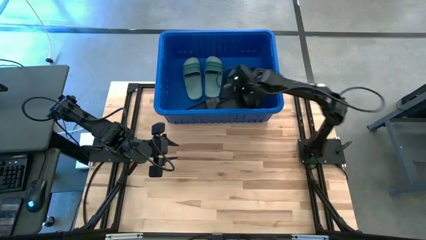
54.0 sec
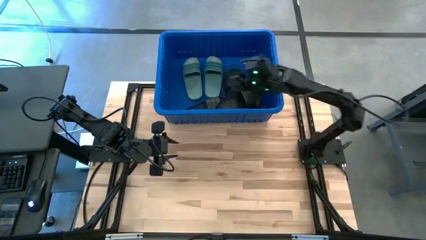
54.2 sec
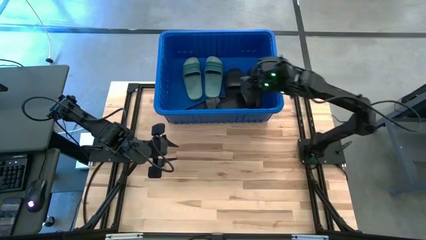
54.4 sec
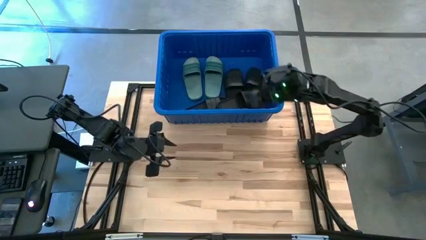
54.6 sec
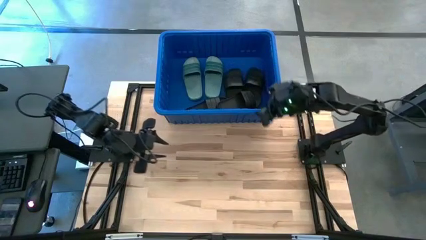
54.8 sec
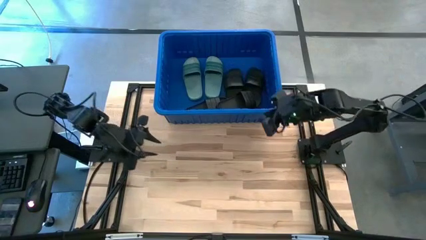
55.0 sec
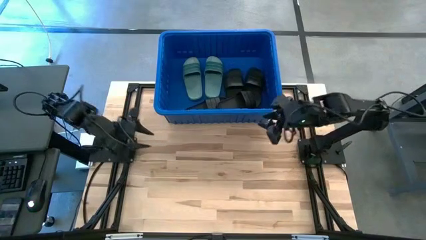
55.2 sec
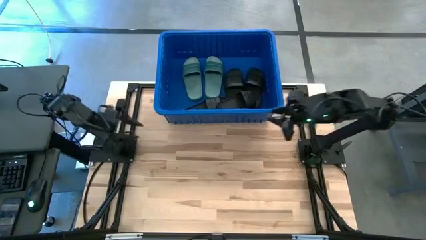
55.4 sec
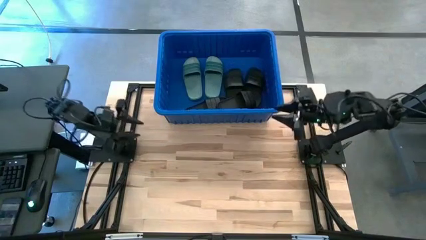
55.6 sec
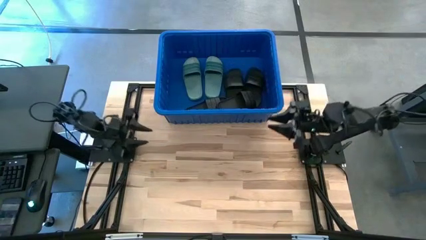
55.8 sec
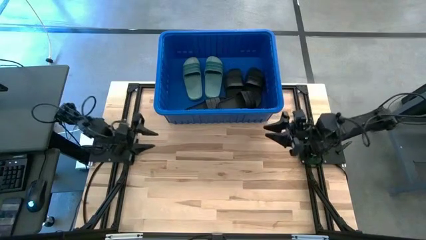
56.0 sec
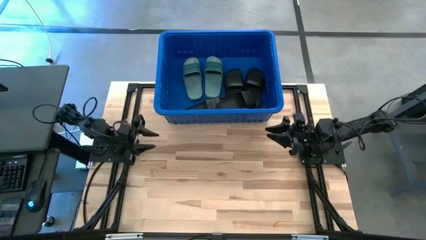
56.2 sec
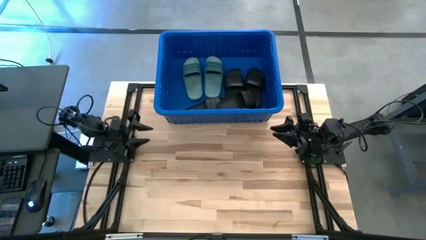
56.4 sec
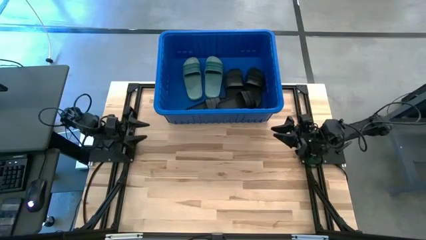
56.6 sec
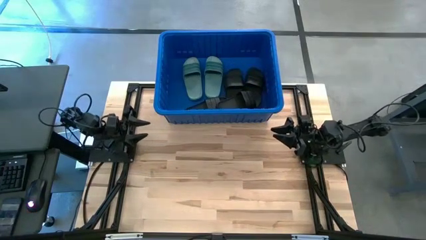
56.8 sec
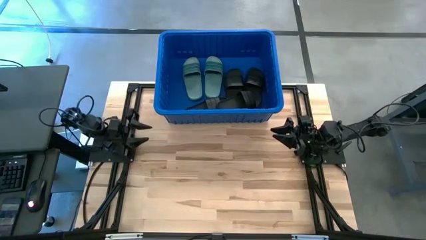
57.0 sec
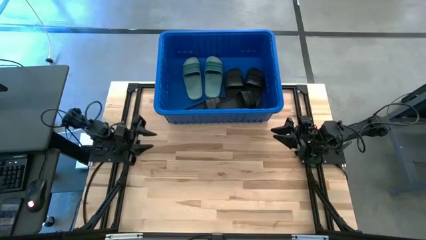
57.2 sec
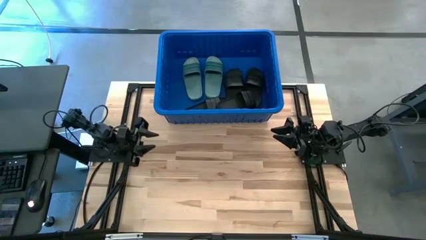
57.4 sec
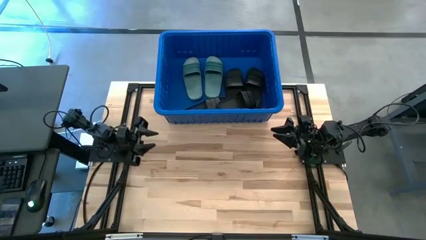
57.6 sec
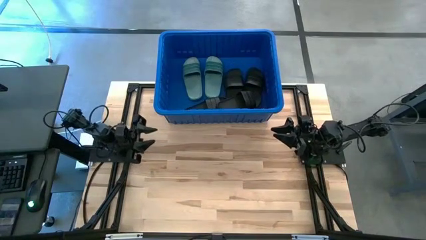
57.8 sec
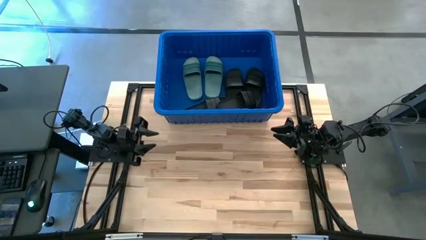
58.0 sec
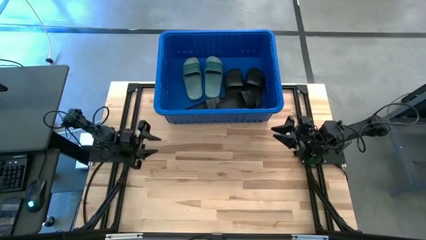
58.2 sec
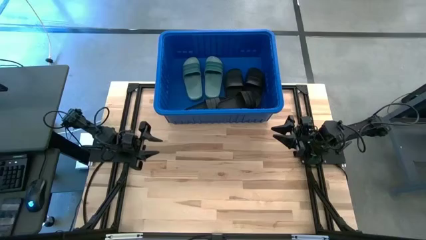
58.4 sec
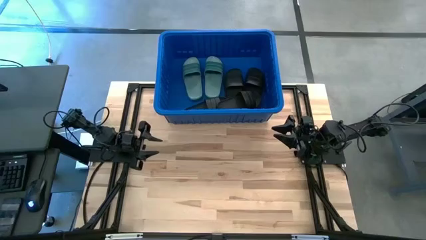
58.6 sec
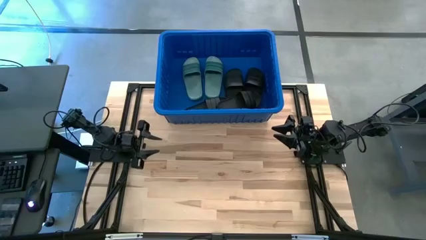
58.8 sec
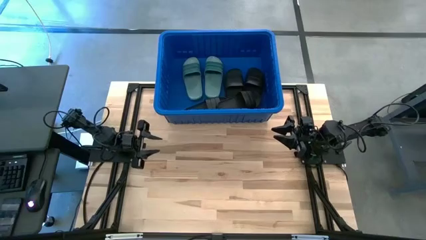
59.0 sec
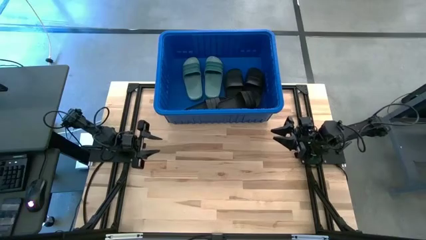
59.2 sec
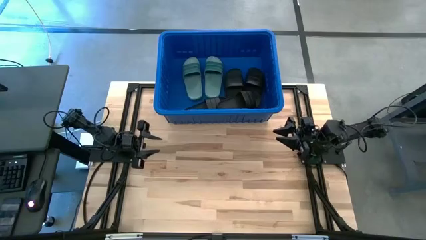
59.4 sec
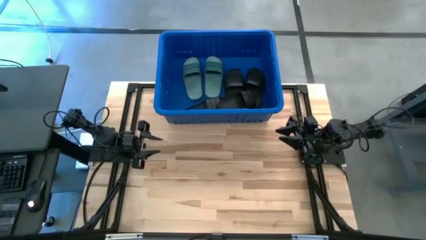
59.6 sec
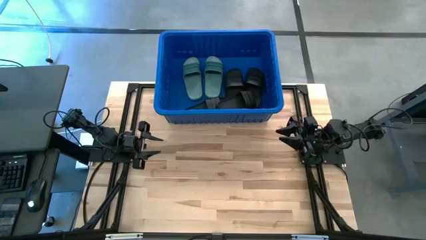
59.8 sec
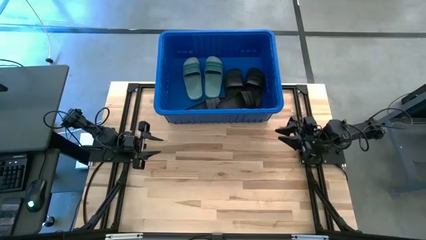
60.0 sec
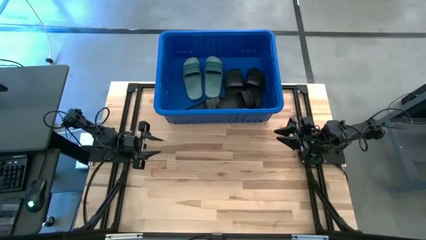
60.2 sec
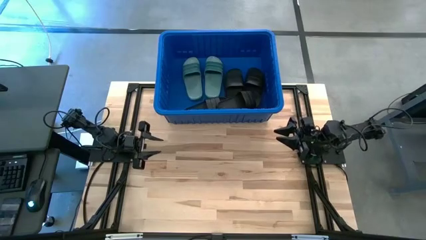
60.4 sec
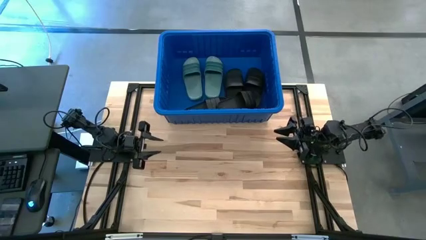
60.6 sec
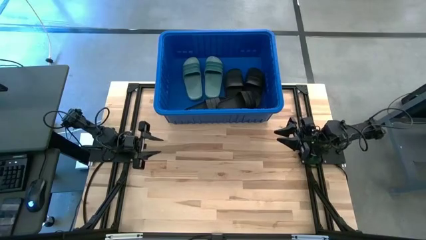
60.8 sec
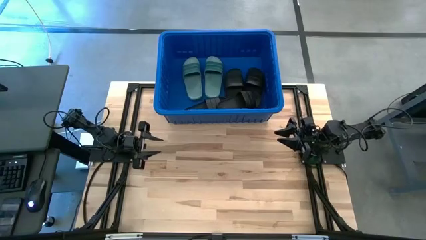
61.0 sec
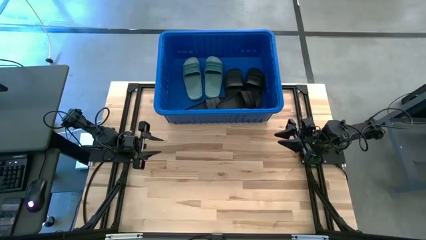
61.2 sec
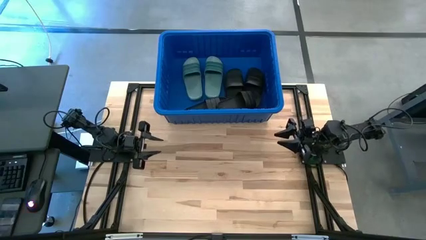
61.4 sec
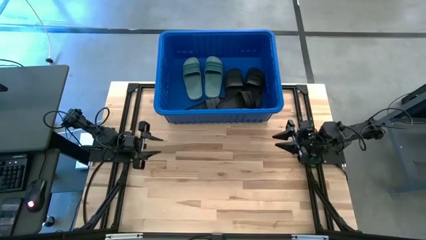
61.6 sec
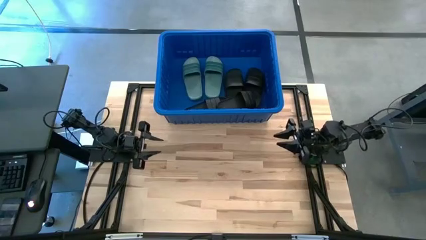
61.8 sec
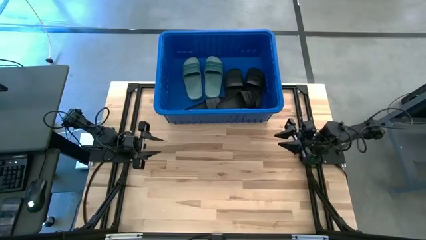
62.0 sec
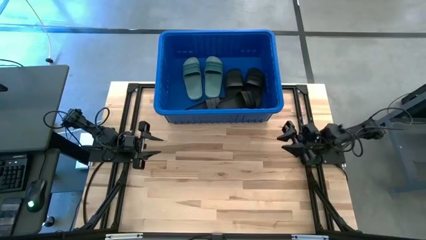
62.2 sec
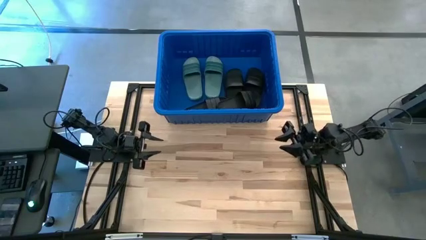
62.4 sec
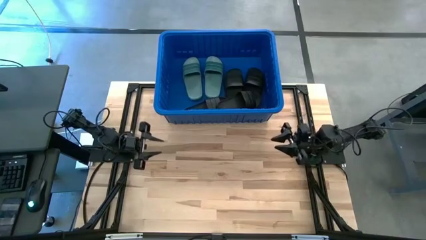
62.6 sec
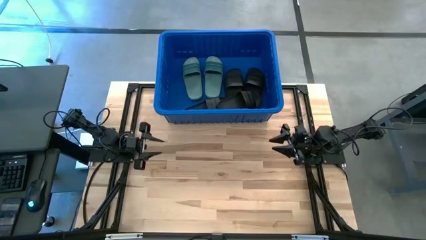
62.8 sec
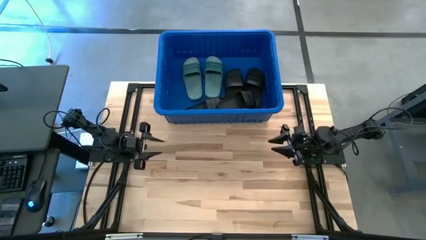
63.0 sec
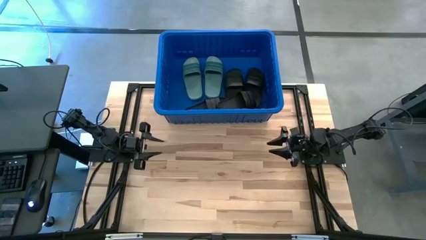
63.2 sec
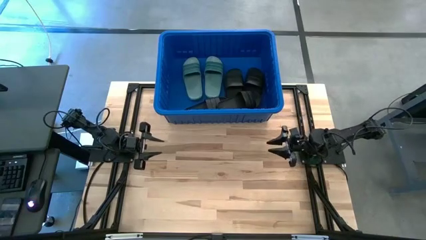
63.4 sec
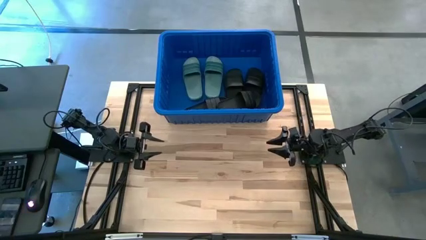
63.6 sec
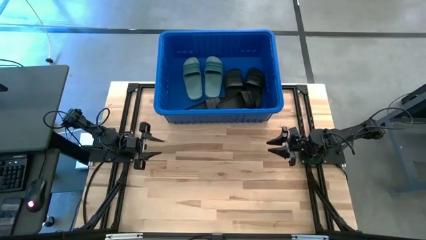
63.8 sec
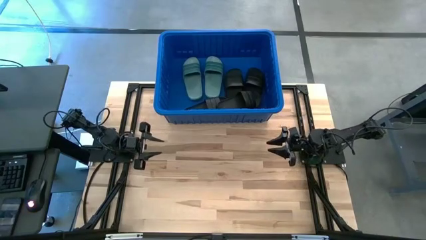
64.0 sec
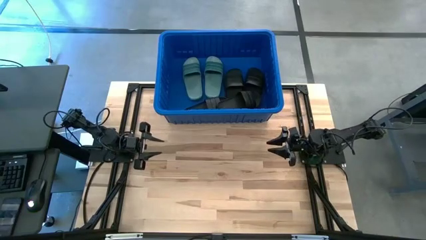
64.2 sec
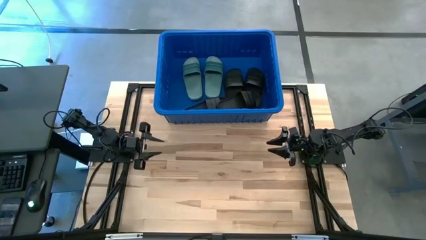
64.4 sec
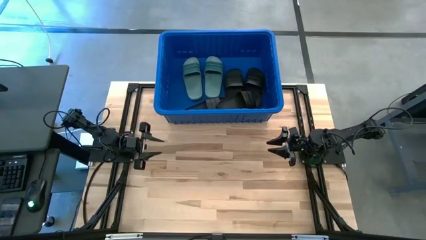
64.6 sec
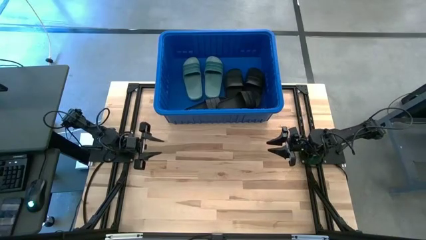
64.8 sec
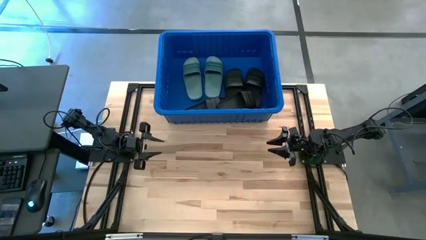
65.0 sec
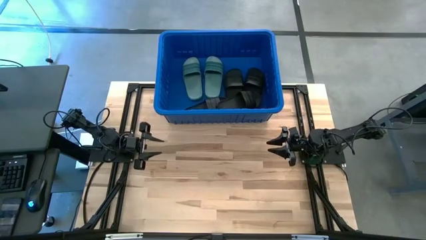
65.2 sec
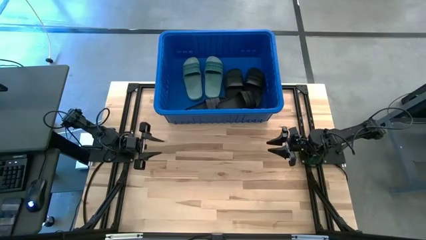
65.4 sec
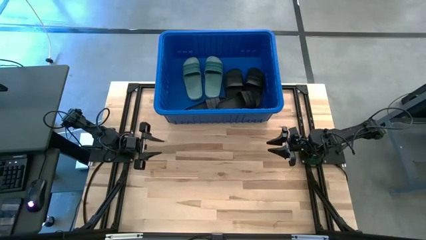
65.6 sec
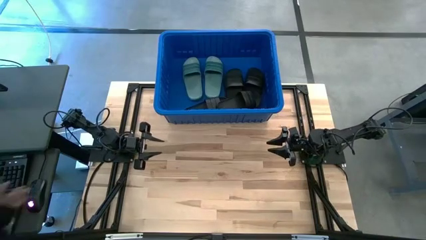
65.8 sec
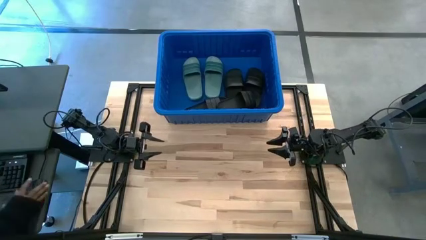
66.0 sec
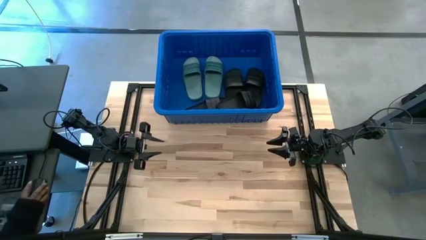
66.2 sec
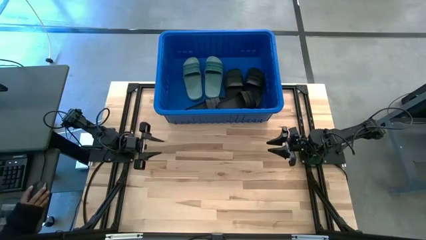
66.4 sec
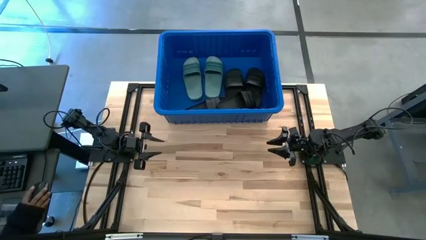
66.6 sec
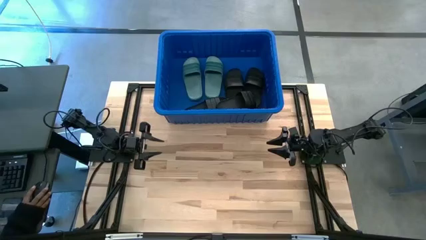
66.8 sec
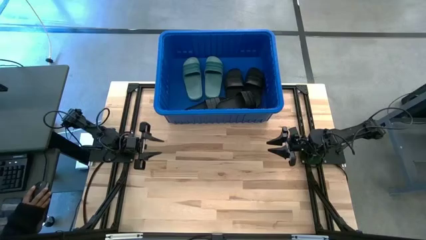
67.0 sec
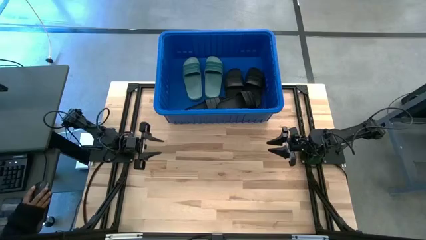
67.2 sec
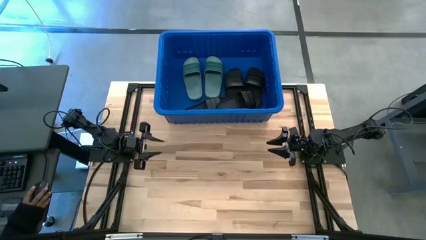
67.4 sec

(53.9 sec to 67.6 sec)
Task: Pick and place slides into bin
Return to Home Position
